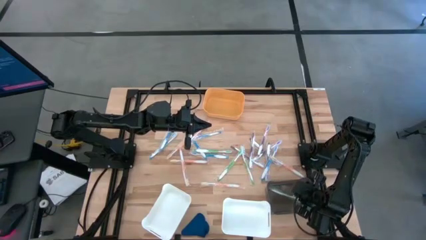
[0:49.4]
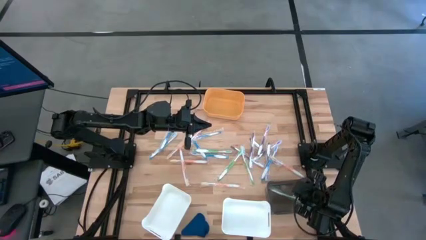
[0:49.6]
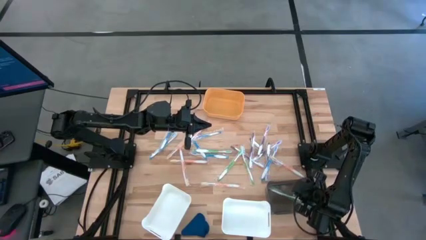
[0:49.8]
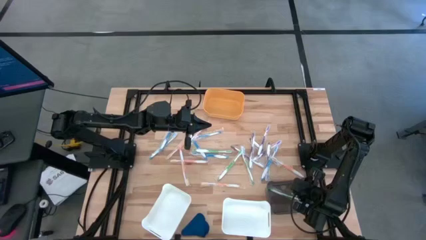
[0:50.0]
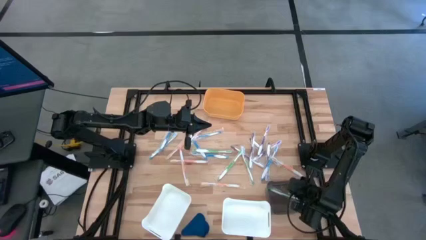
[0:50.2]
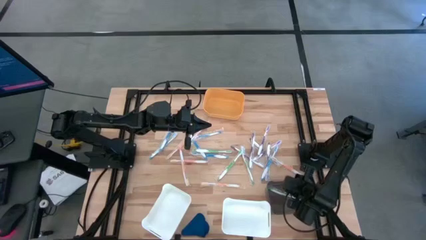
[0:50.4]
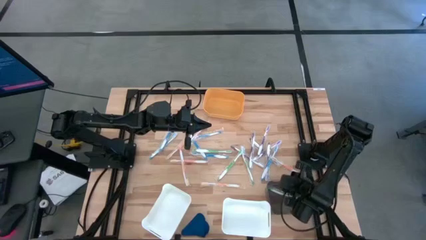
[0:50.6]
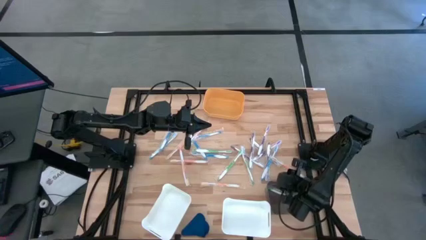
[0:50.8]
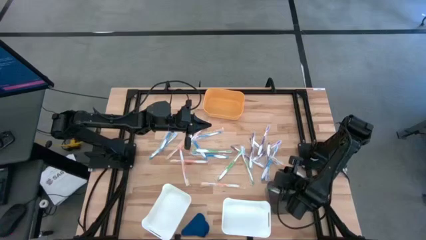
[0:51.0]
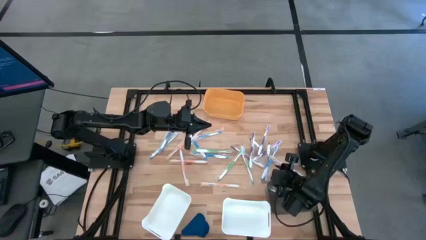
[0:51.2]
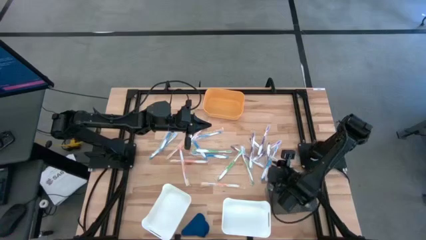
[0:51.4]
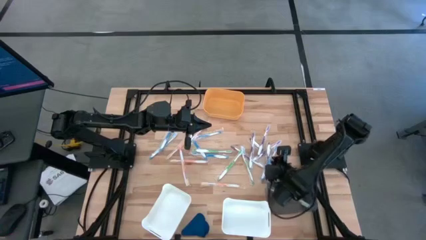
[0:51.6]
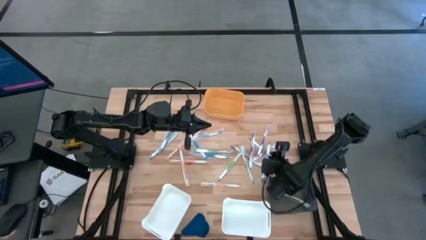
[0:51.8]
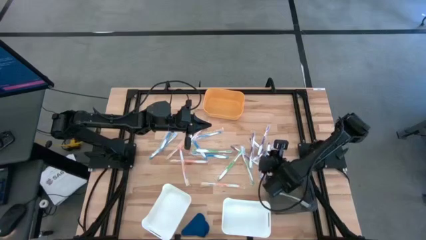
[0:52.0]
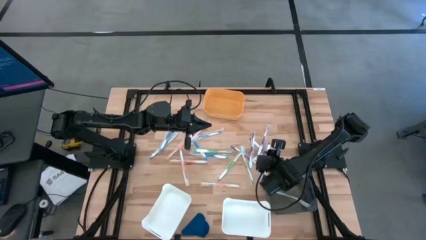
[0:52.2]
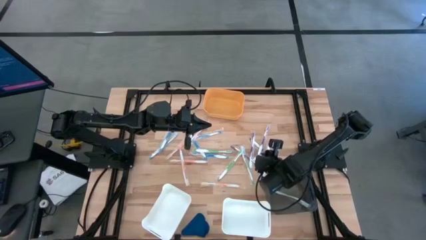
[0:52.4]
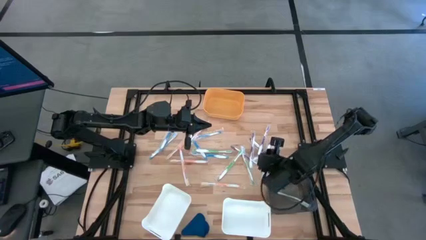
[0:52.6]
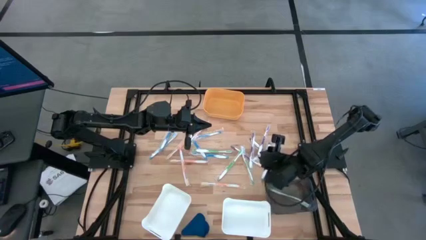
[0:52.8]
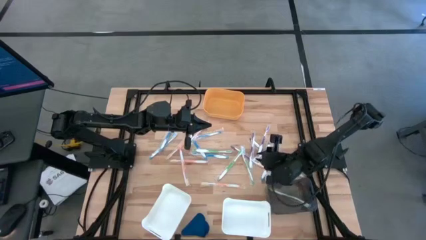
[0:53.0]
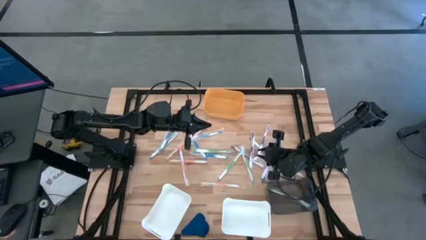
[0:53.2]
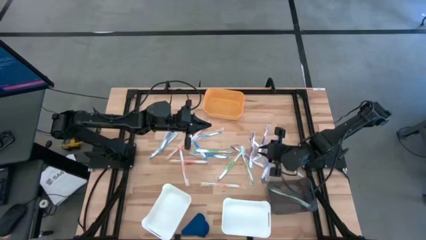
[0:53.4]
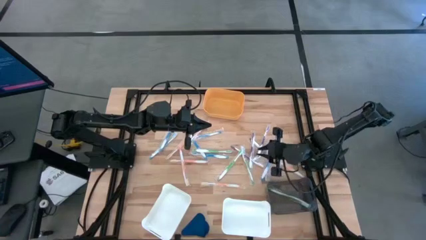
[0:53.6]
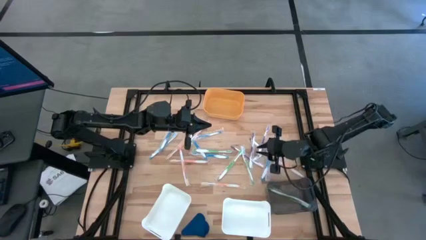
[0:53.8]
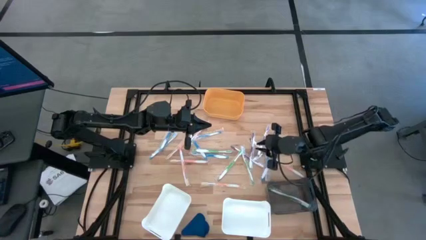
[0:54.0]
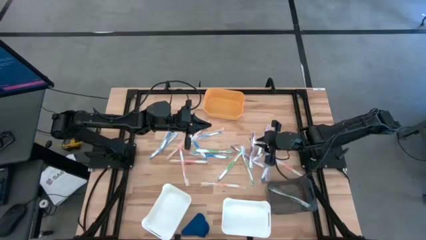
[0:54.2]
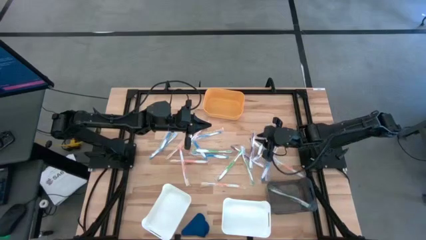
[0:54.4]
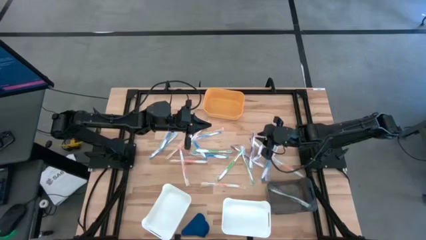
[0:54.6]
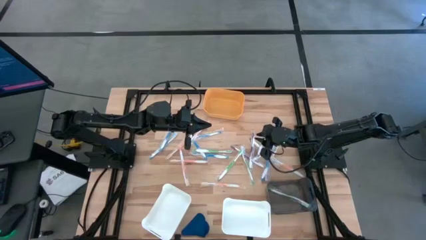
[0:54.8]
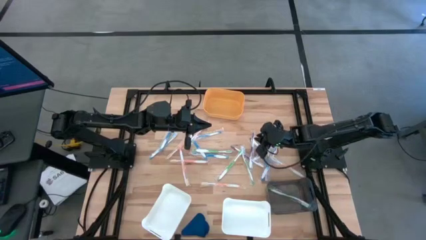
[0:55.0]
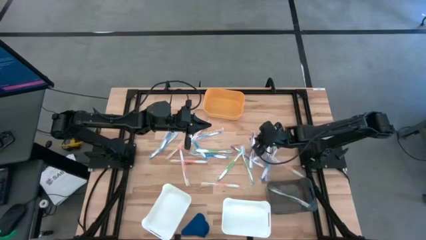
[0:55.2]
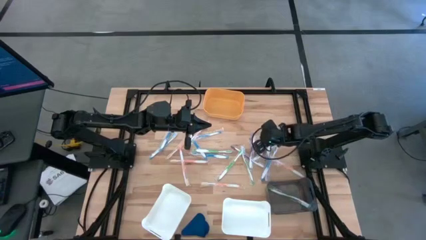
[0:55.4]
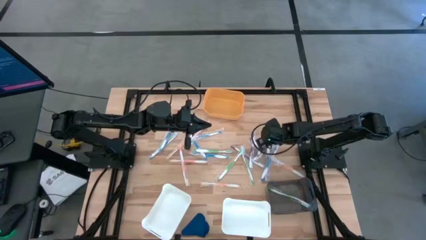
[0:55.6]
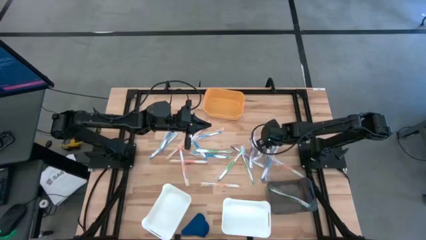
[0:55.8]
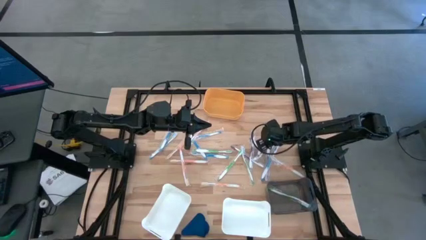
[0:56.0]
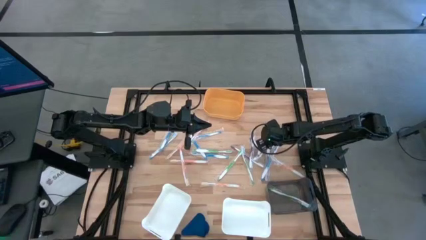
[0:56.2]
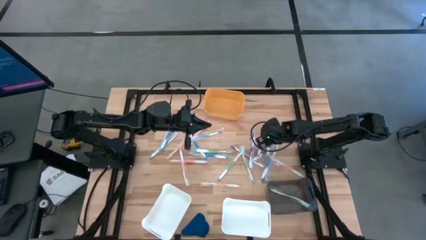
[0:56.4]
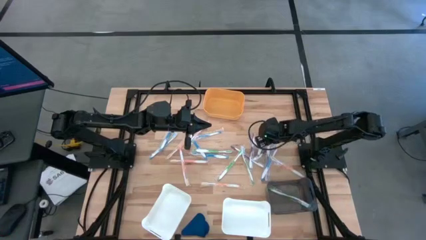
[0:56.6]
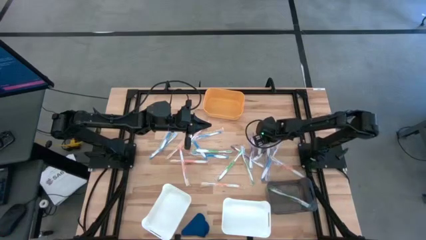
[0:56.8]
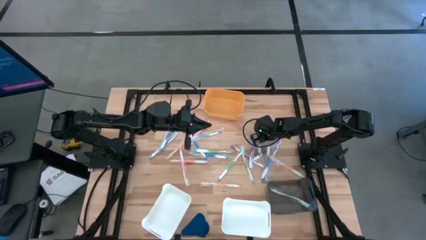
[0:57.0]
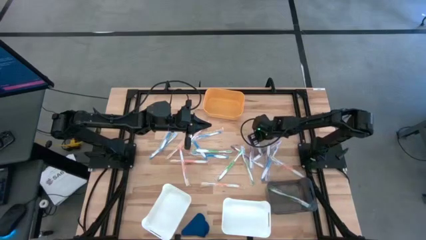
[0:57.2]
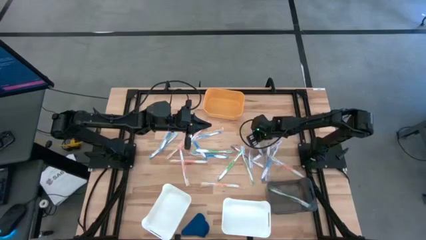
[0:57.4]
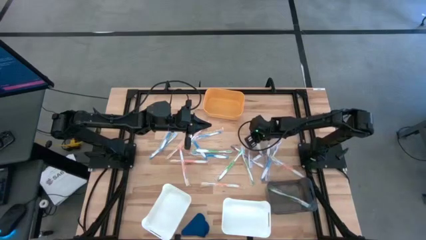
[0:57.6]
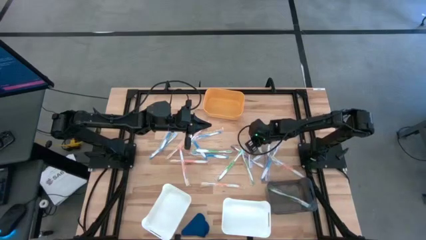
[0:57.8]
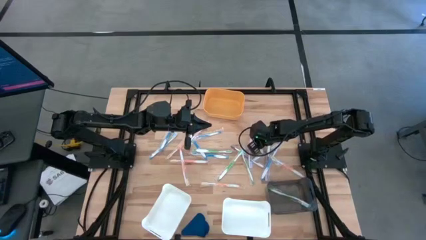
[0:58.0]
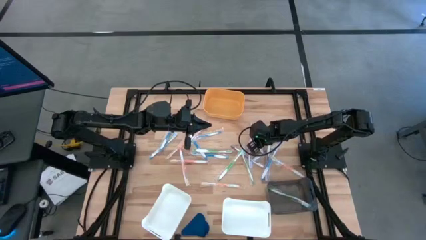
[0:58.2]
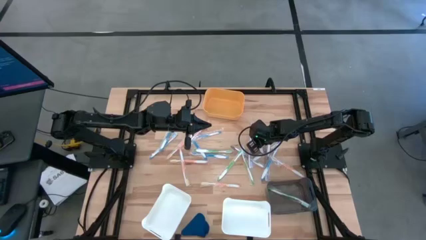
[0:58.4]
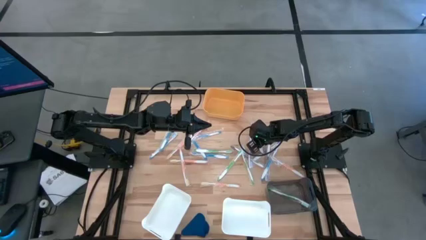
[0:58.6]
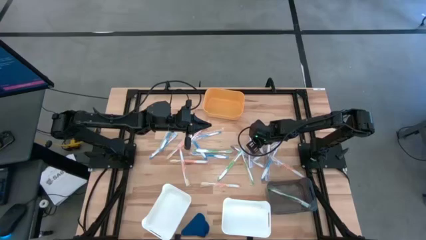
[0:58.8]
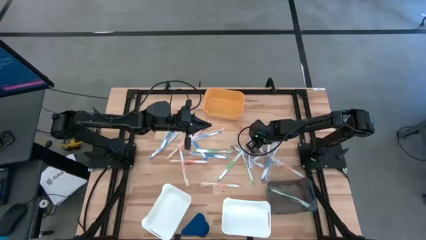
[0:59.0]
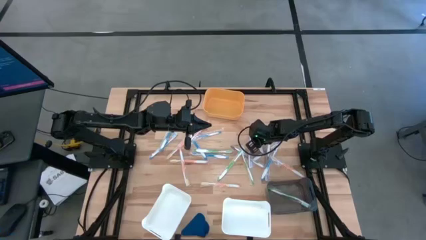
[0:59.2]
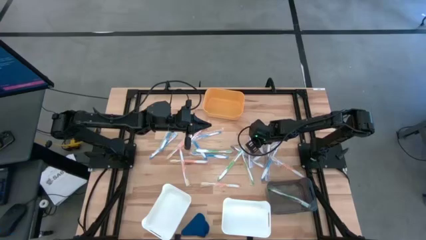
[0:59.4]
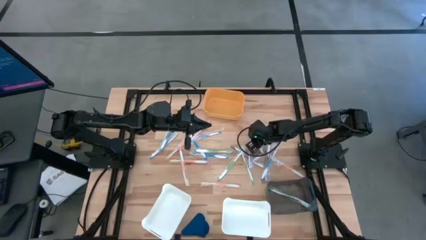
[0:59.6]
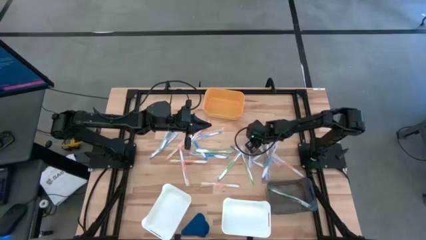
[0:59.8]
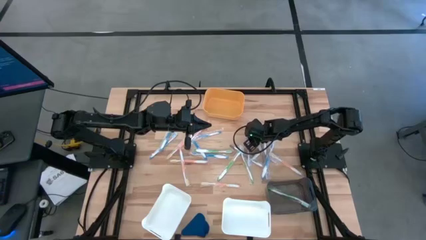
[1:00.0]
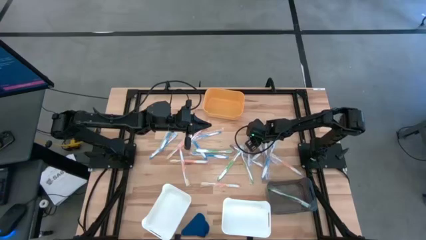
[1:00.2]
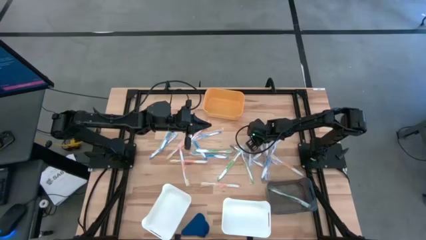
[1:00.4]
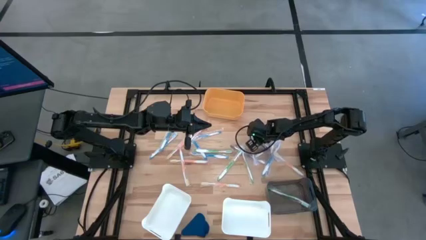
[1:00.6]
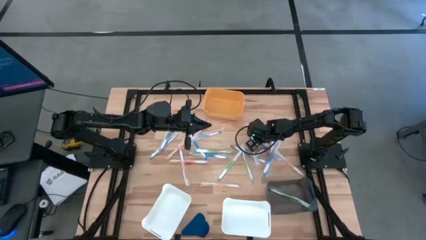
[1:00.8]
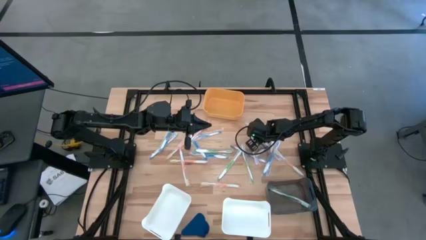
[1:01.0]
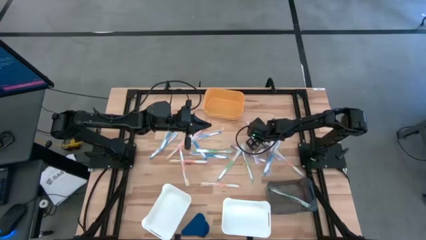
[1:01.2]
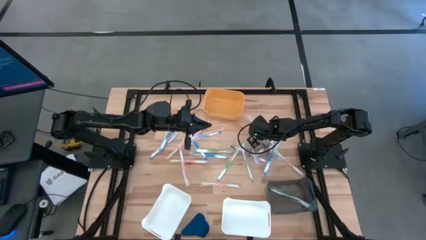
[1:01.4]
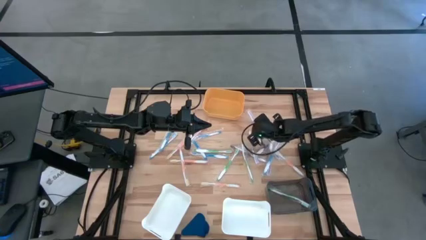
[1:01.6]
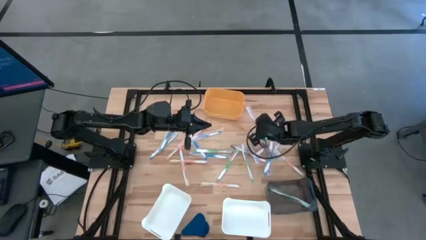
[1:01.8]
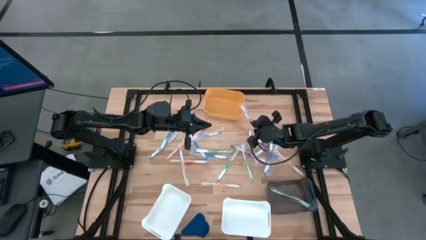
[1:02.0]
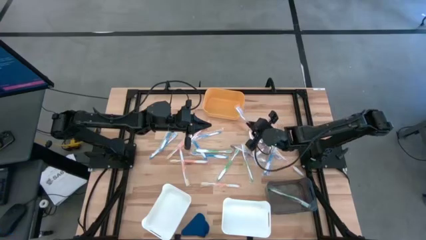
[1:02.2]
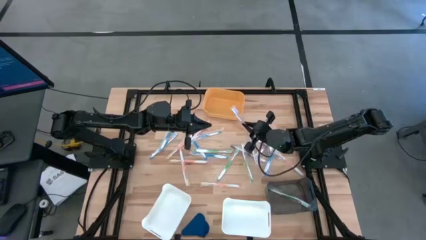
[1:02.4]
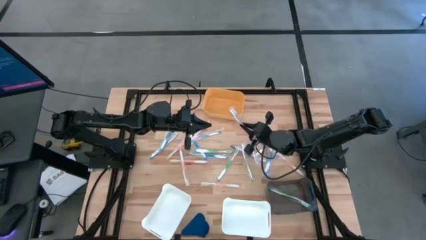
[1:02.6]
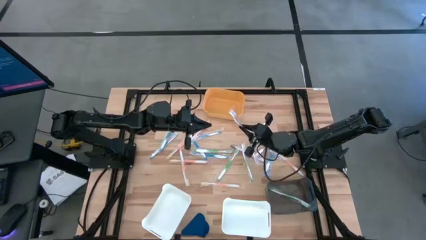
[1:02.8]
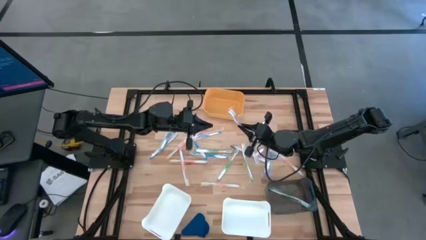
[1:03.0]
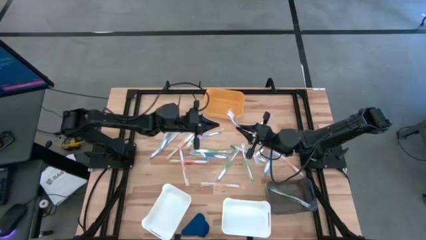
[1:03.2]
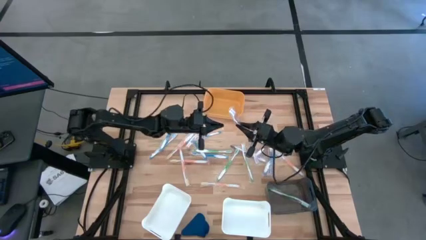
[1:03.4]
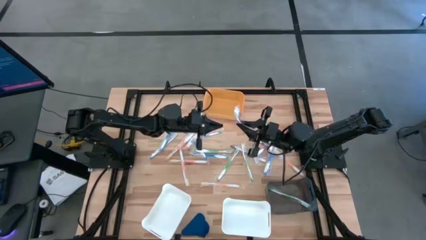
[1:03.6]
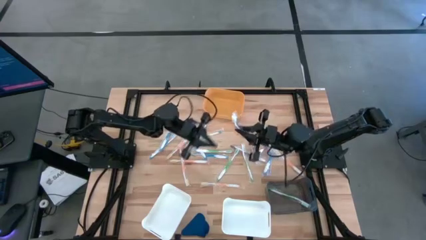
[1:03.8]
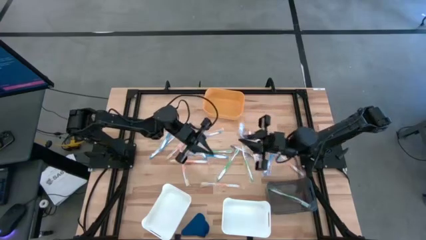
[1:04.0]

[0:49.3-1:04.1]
Task: Pick & Place Toothbrushes
Put the purple toothbrush into the yellow bin

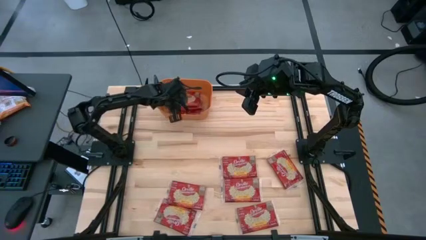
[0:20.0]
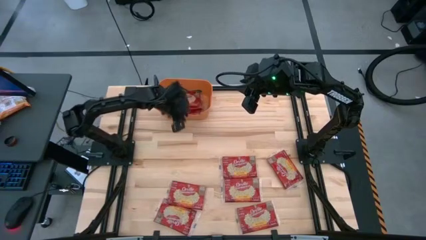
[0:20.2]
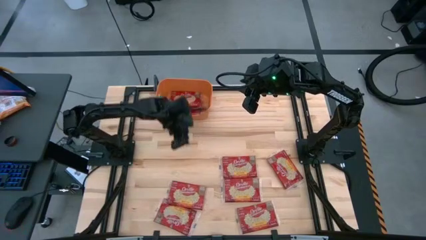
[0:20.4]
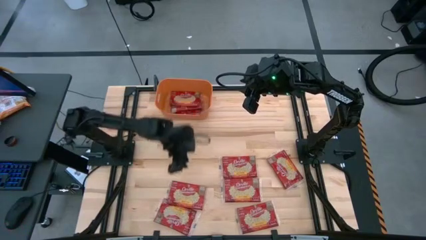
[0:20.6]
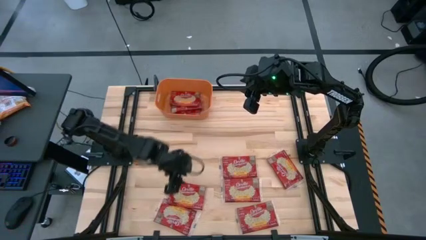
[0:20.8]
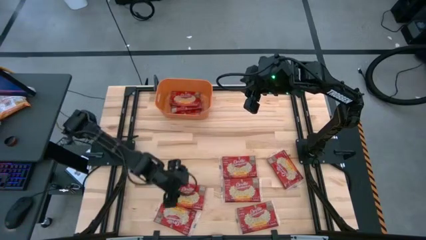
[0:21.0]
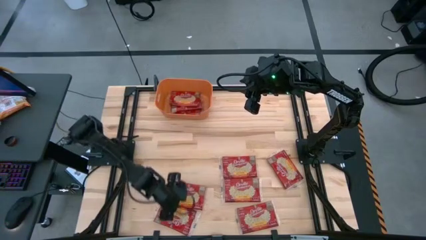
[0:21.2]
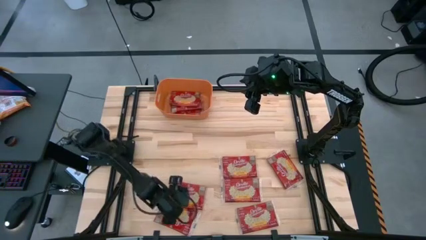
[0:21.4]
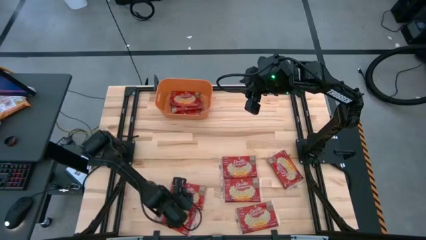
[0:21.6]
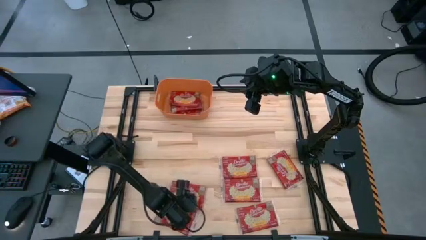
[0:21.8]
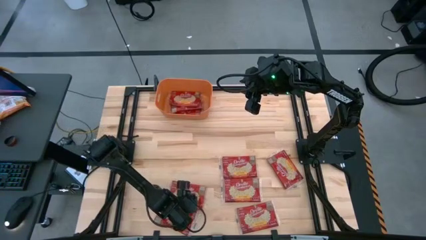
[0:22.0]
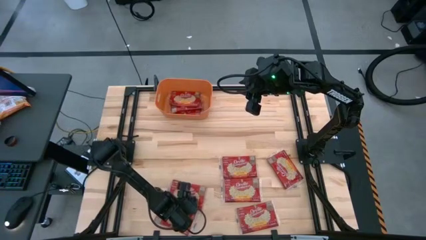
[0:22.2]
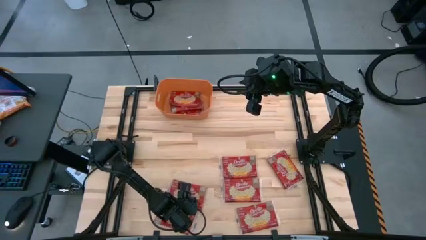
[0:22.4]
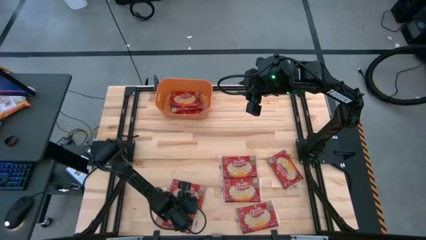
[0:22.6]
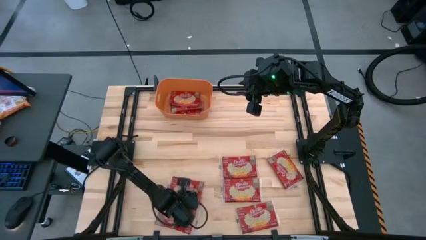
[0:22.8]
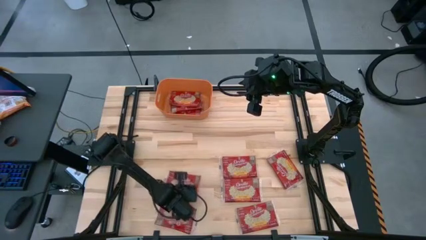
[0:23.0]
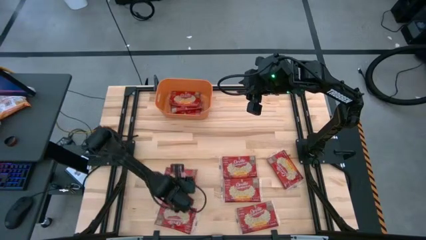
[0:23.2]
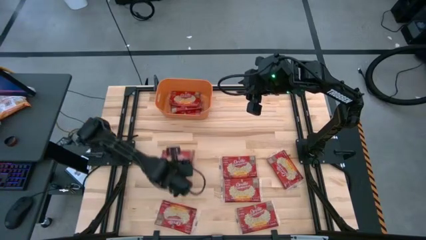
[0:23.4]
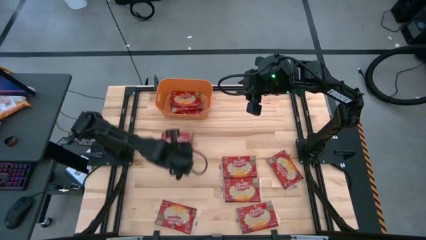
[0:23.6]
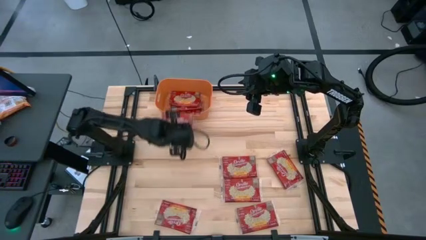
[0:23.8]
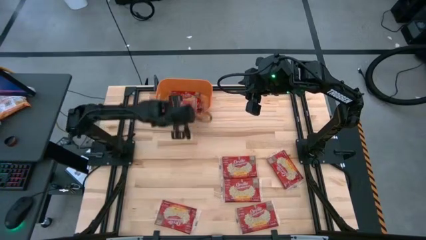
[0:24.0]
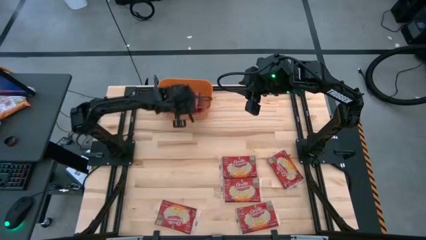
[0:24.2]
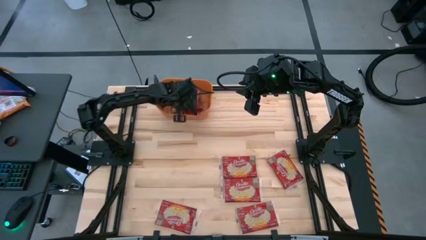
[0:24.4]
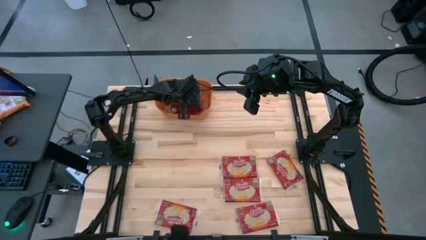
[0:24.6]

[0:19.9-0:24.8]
Task: Sort popcorn bags into baskets
Put the red popcorn bag into the orange bin
